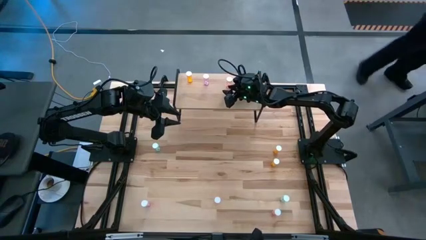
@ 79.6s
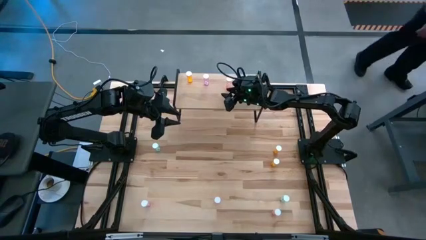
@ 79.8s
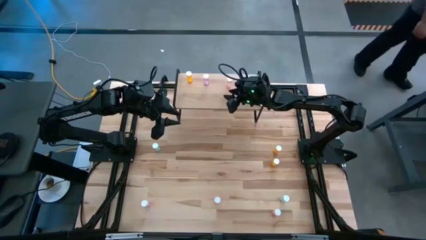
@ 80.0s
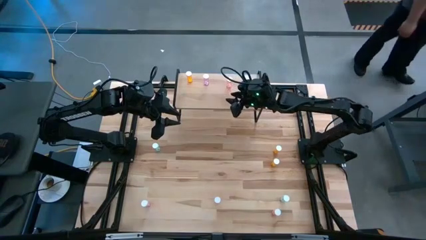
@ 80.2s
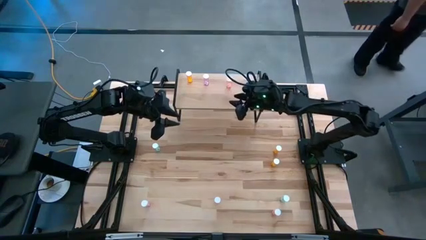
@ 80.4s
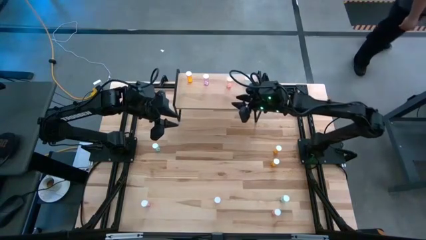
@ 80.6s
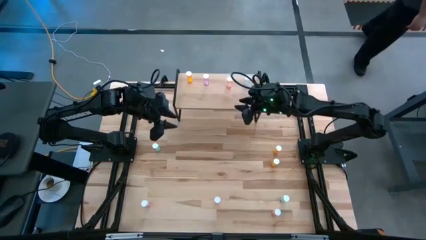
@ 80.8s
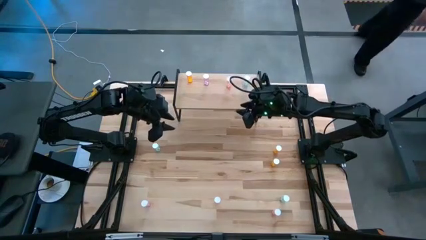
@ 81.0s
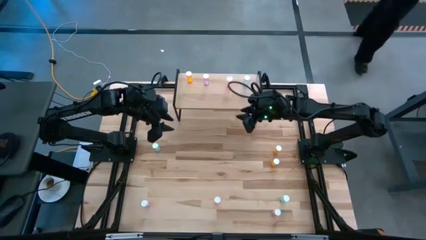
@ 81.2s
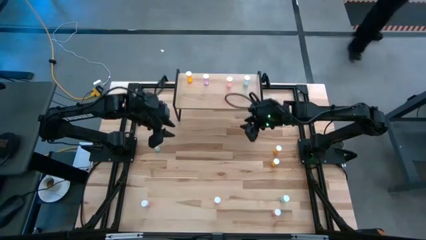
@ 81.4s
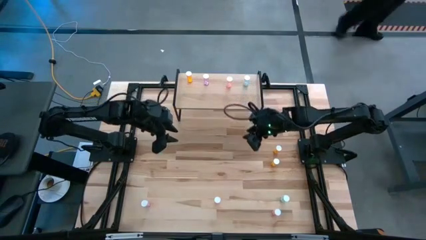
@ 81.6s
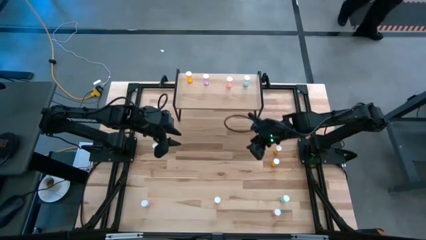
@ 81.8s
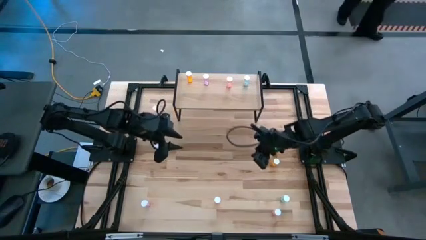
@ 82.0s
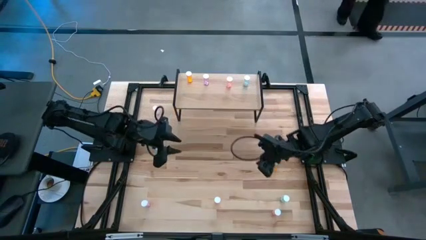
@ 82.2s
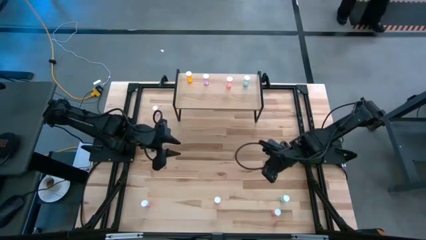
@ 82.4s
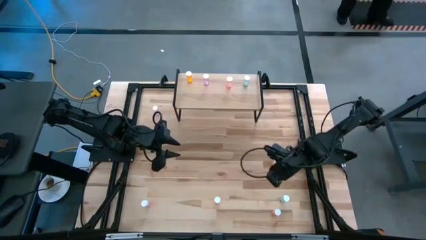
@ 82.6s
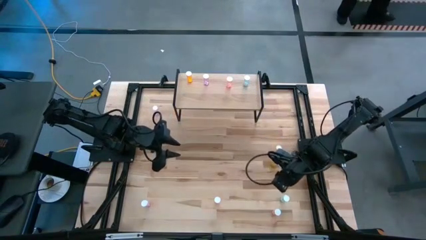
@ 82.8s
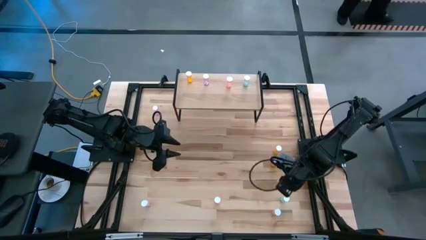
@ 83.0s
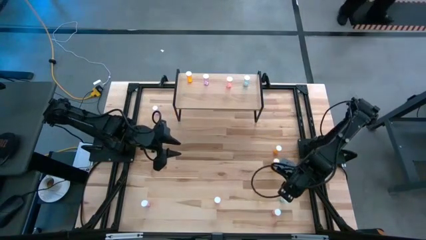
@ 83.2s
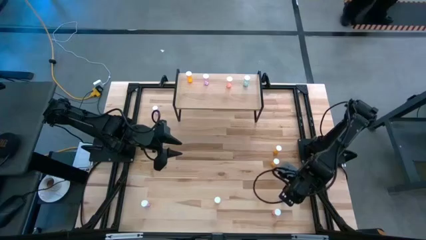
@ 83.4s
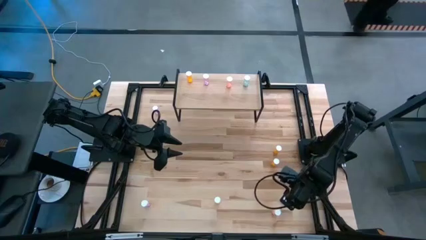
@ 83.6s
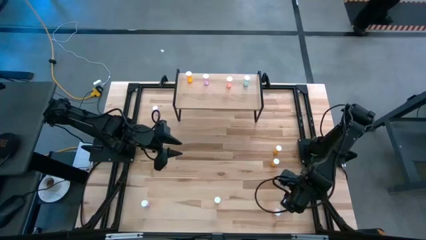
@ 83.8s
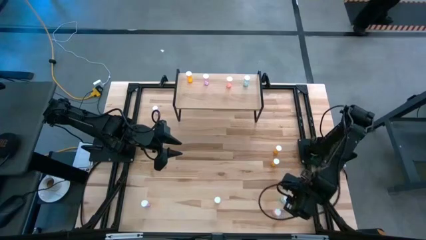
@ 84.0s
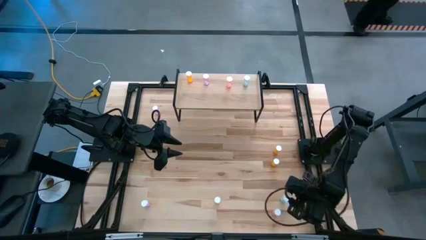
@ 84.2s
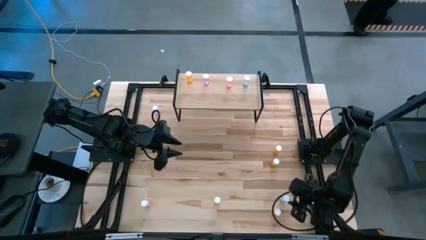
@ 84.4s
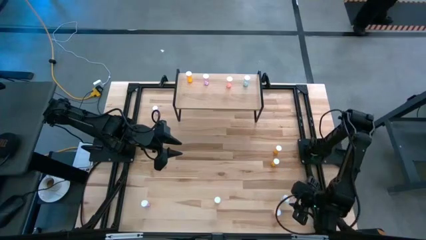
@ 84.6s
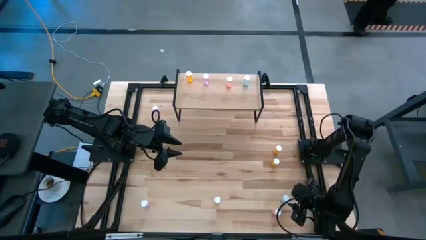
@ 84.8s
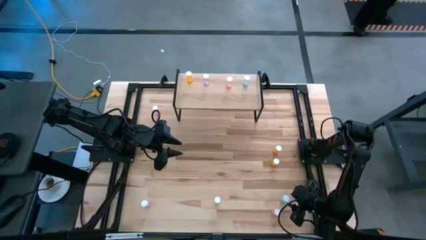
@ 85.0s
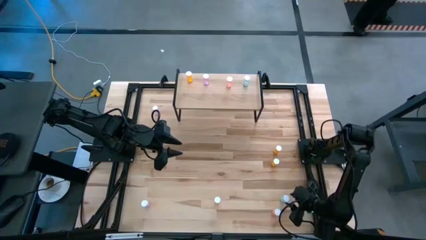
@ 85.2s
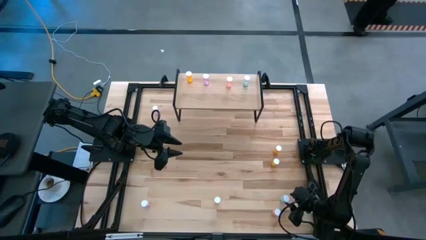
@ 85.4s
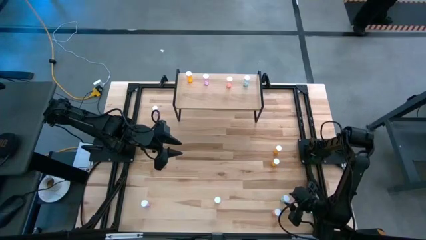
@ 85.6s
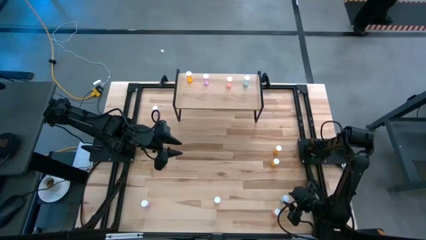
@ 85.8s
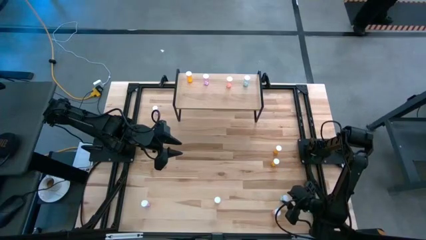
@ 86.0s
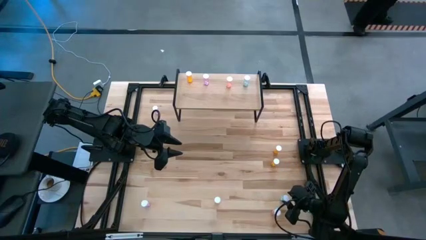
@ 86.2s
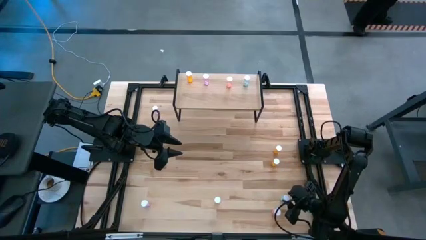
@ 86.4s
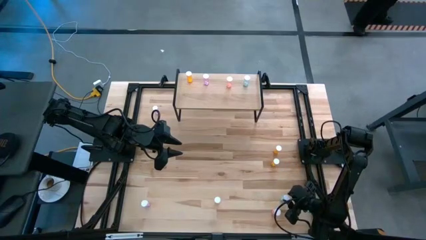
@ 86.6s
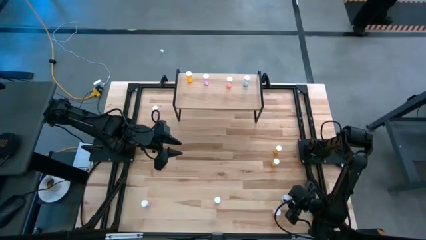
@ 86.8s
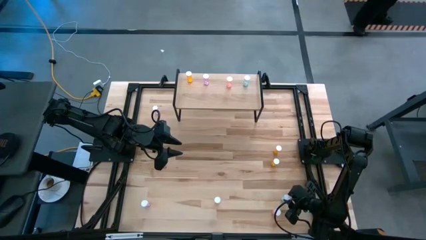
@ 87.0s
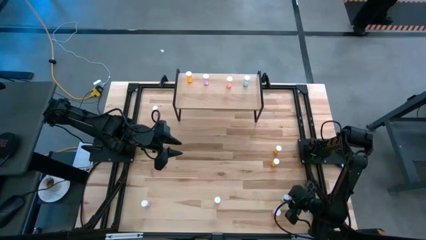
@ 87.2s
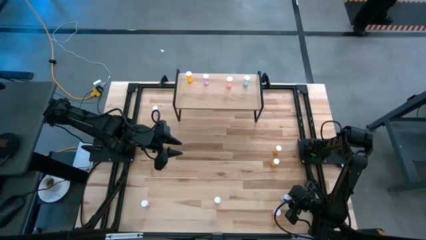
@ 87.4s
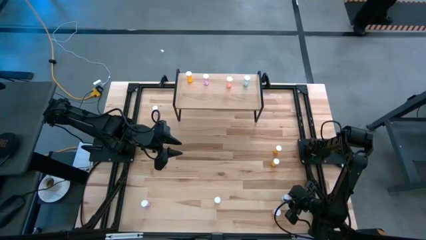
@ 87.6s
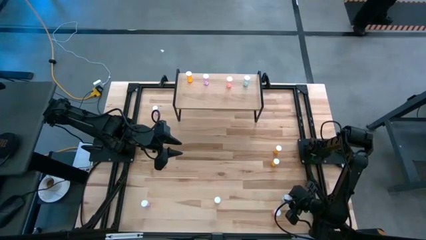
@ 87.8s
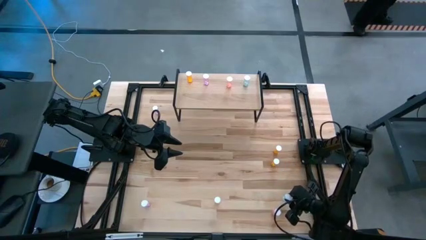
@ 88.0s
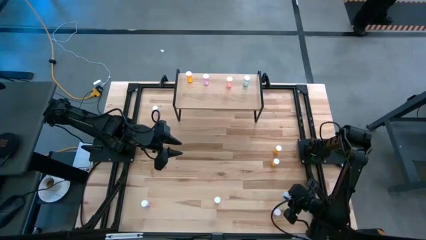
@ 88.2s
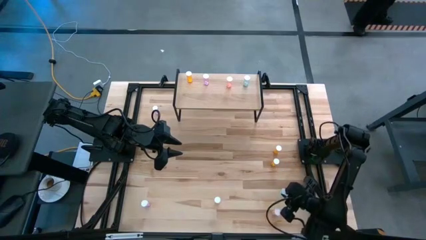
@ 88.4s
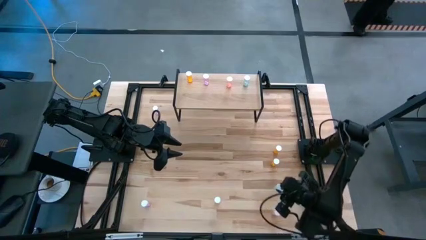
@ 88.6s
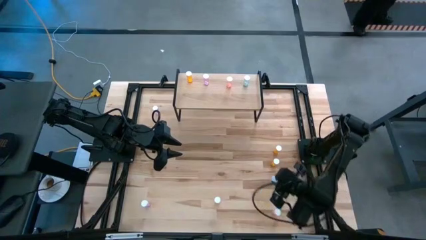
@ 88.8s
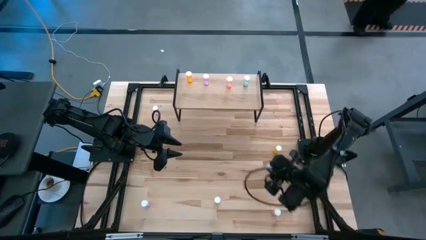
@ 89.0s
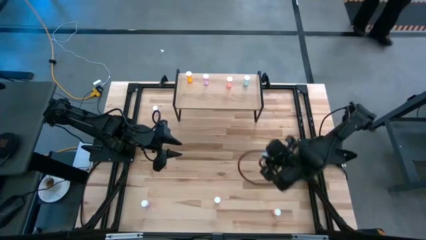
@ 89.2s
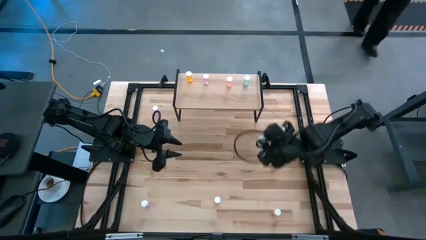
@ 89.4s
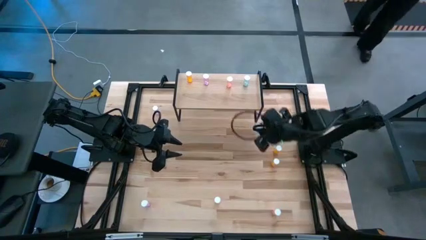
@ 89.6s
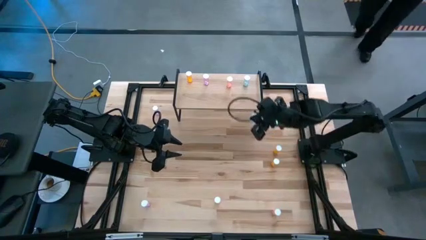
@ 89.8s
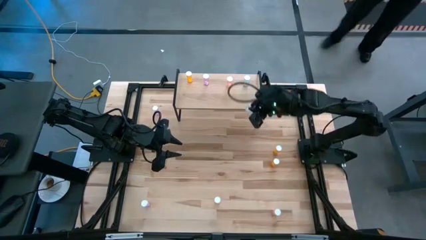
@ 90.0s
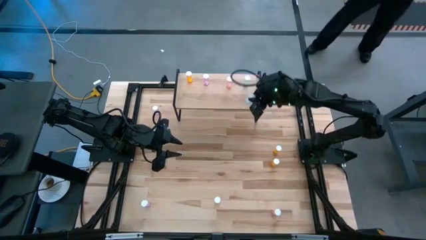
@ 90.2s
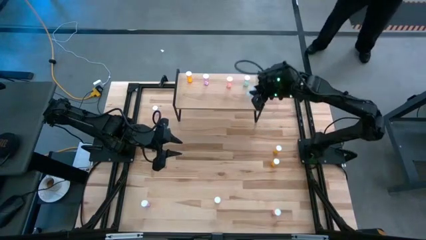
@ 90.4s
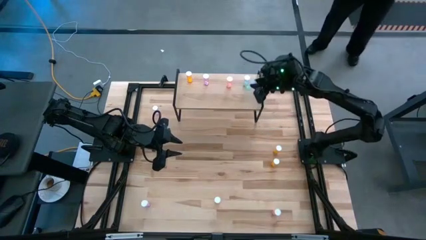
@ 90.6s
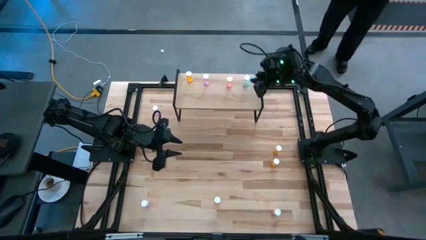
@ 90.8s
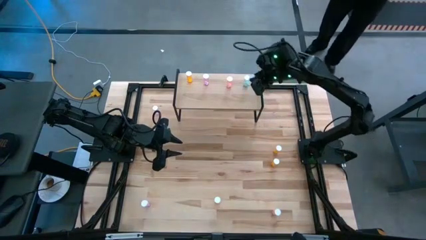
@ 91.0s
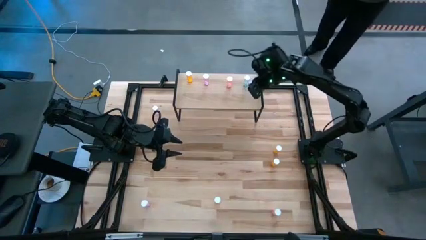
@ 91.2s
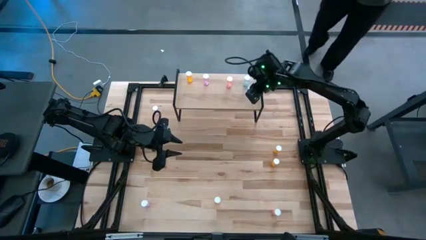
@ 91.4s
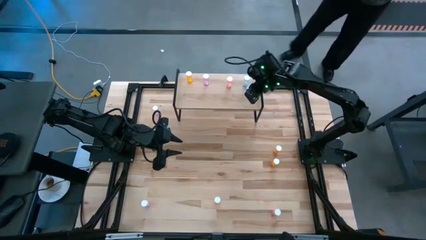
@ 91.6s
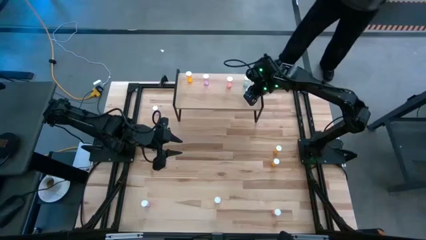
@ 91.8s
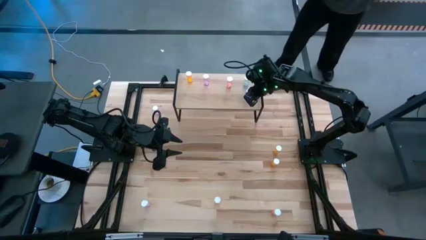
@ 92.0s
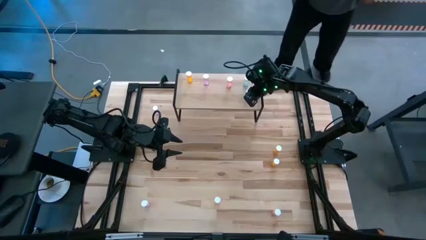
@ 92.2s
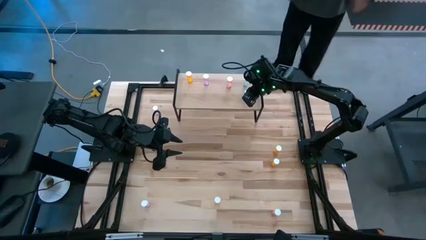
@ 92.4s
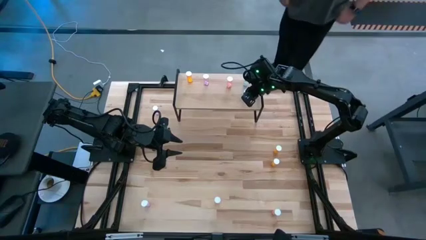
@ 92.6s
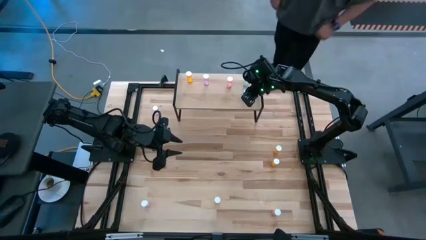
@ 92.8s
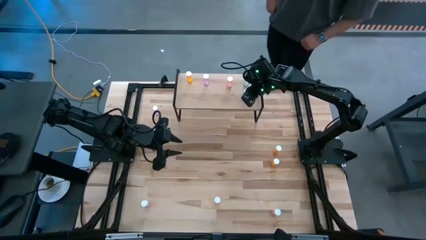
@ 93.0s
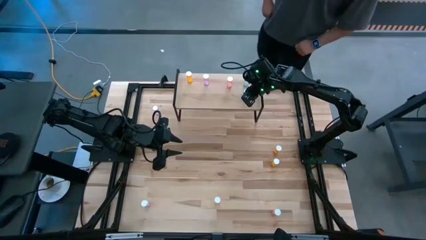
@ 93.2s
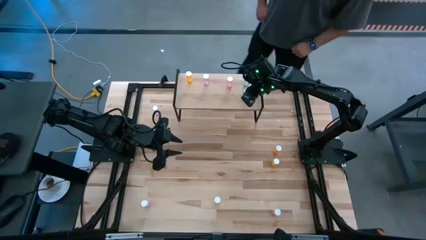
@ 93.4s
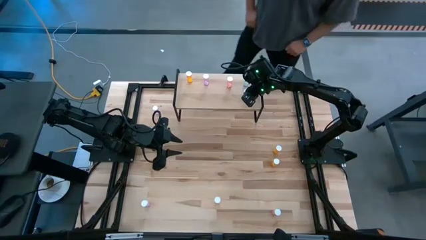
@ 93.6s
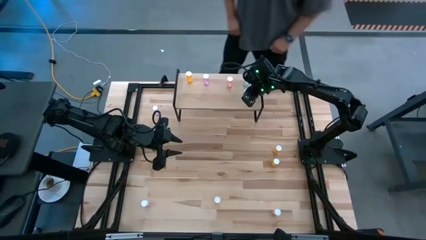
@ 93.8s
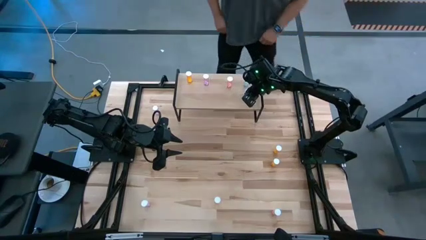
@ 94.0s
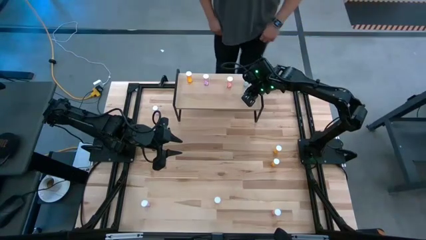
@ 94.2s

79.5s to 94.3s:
Task: Pick and place medicine bottles onto shelf by color
Put the right blue pill bottle on the shelf aligned with the other blue pill bottle
